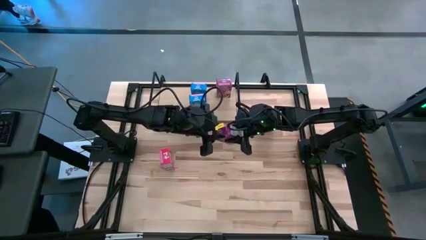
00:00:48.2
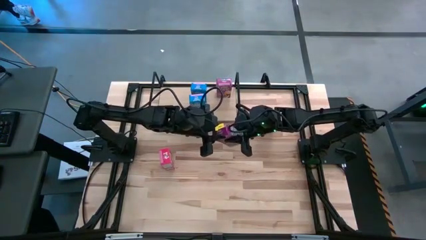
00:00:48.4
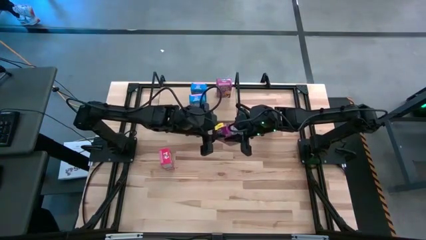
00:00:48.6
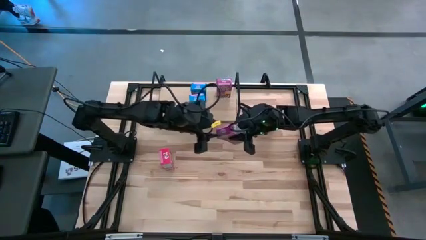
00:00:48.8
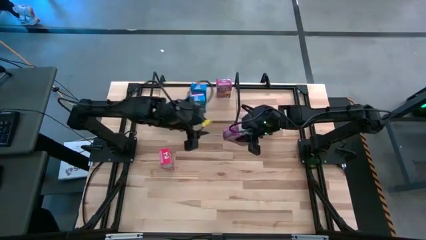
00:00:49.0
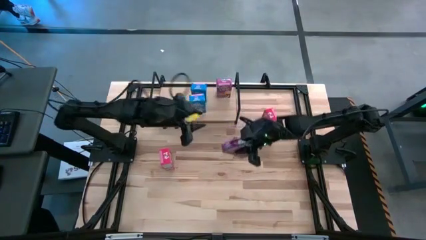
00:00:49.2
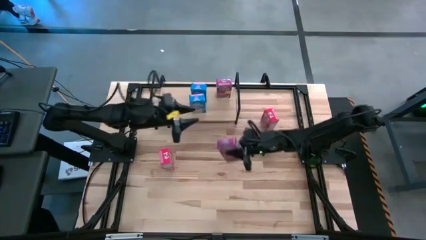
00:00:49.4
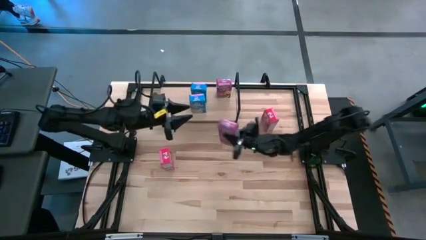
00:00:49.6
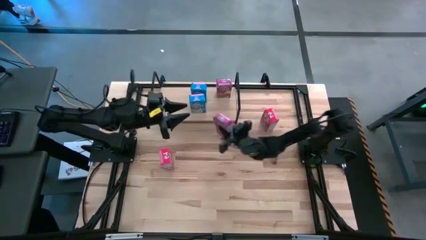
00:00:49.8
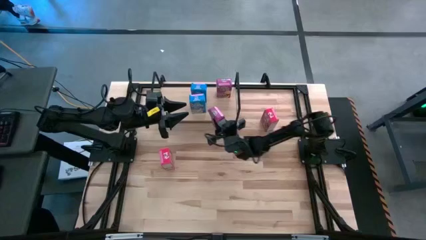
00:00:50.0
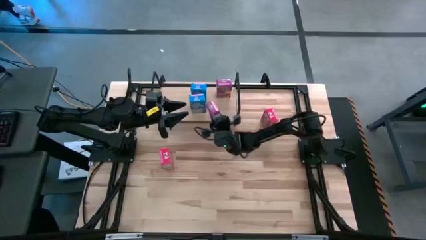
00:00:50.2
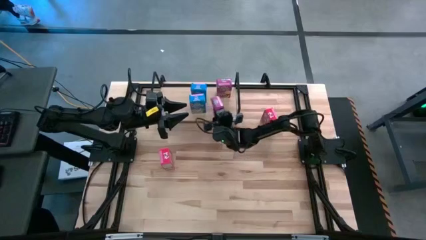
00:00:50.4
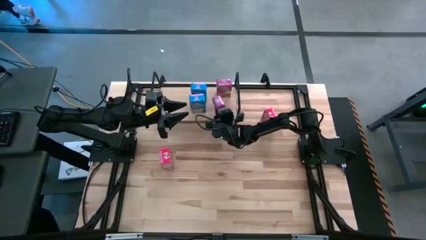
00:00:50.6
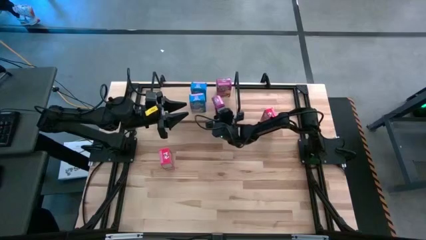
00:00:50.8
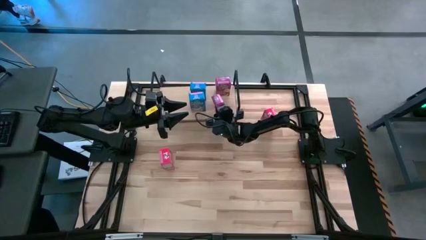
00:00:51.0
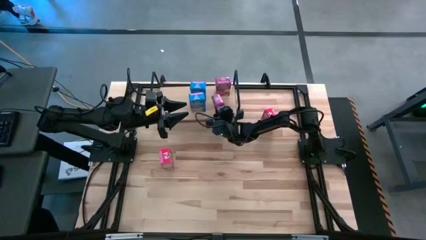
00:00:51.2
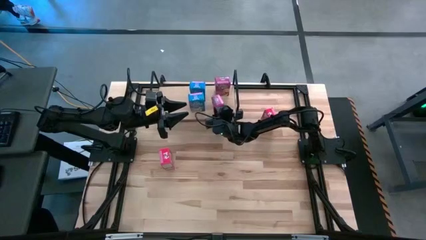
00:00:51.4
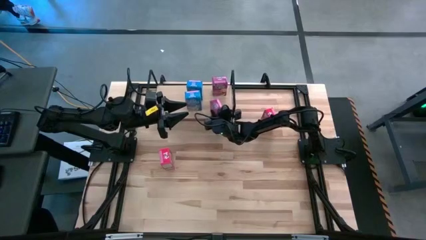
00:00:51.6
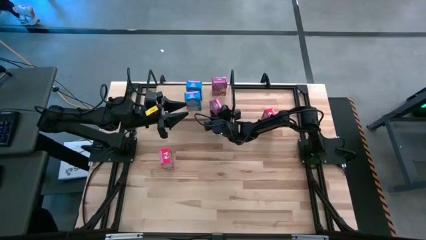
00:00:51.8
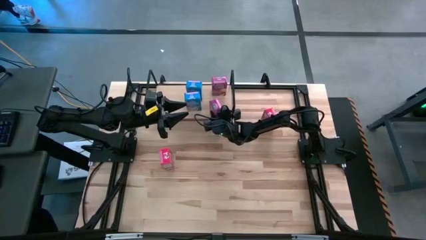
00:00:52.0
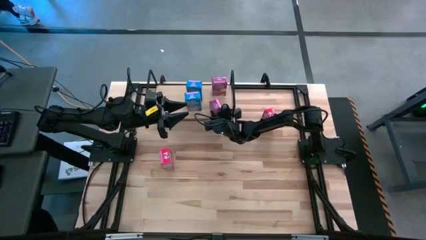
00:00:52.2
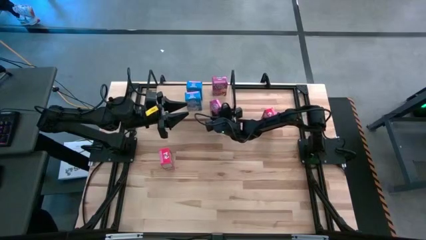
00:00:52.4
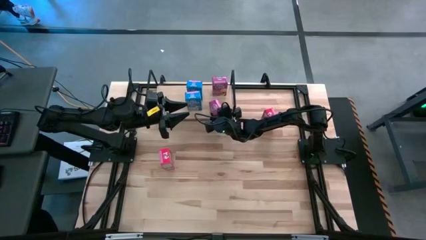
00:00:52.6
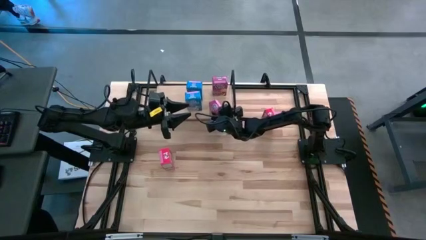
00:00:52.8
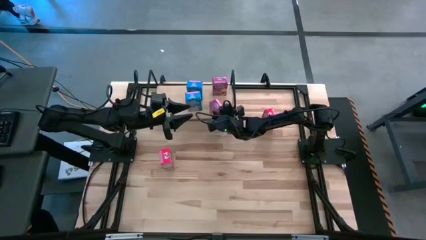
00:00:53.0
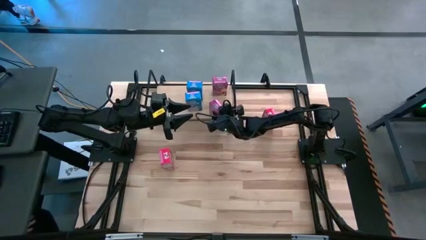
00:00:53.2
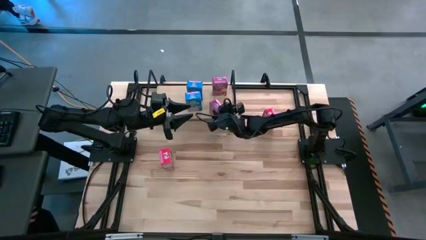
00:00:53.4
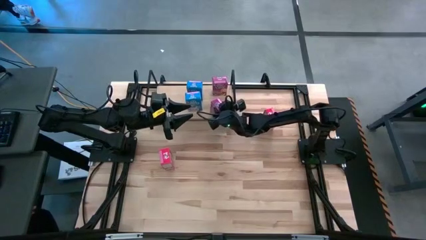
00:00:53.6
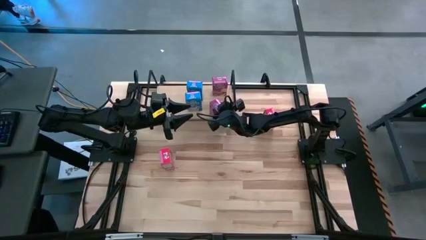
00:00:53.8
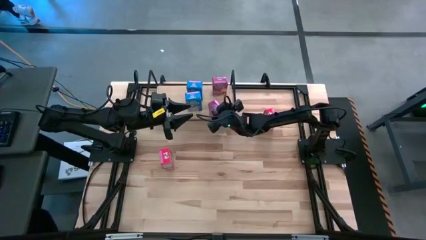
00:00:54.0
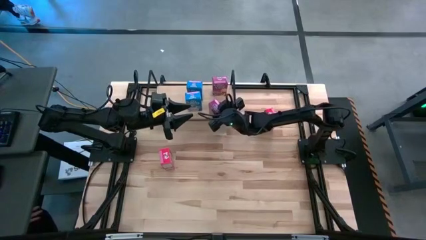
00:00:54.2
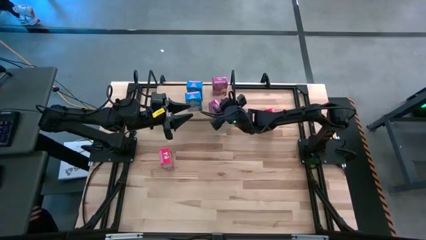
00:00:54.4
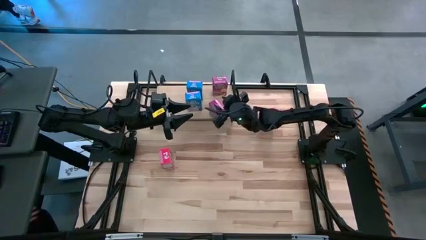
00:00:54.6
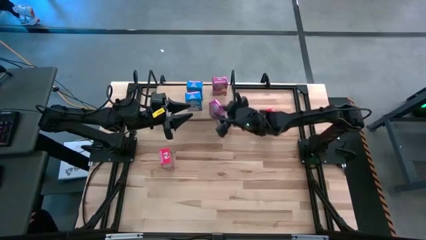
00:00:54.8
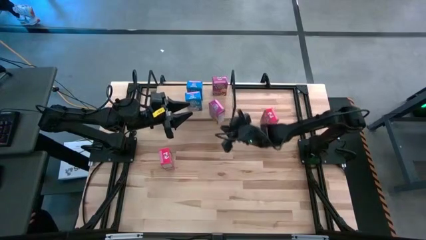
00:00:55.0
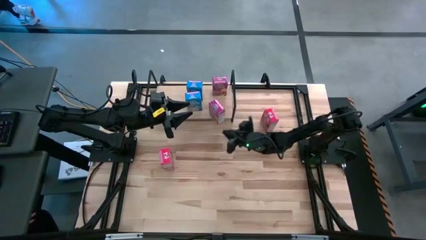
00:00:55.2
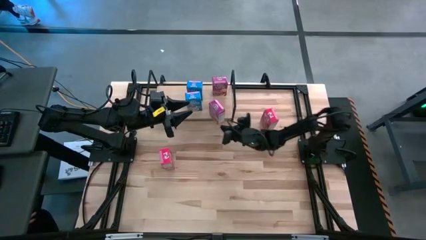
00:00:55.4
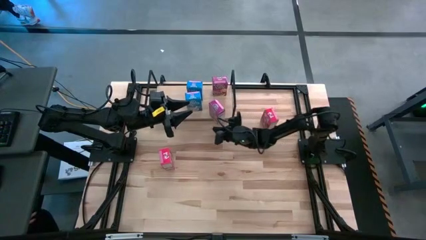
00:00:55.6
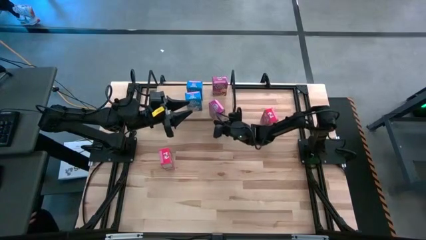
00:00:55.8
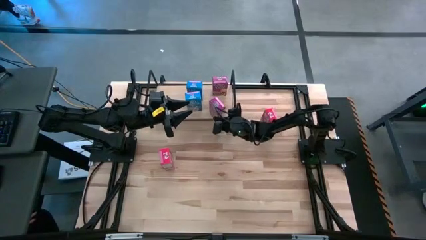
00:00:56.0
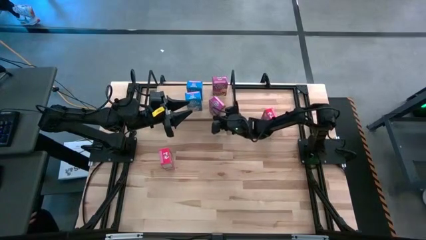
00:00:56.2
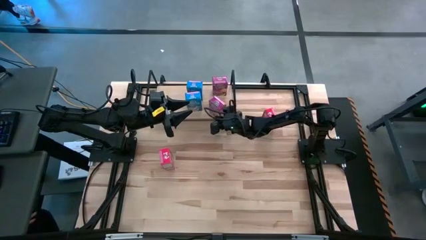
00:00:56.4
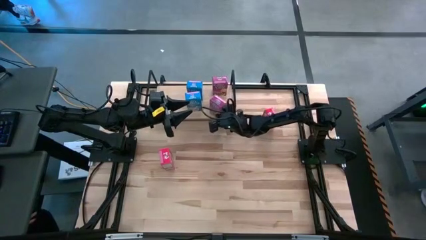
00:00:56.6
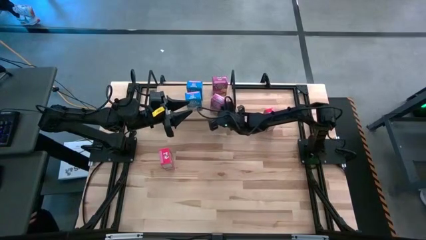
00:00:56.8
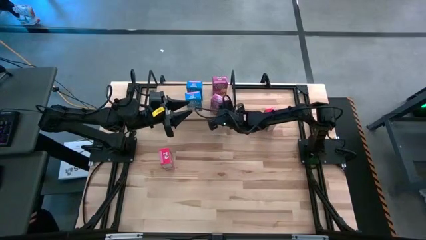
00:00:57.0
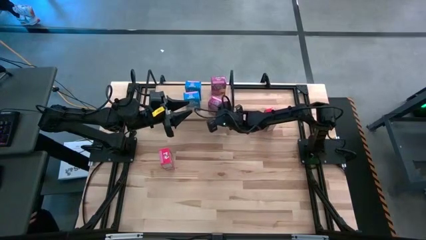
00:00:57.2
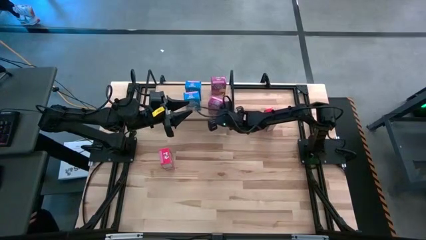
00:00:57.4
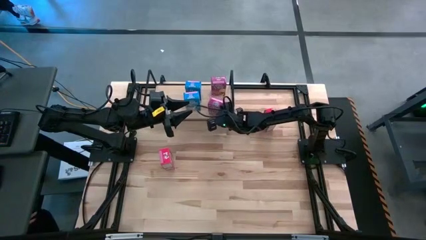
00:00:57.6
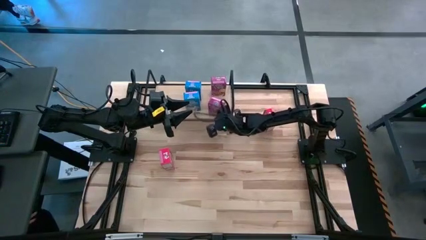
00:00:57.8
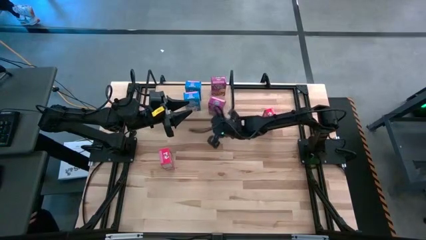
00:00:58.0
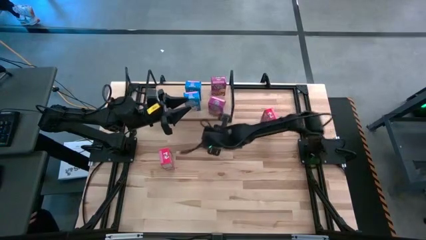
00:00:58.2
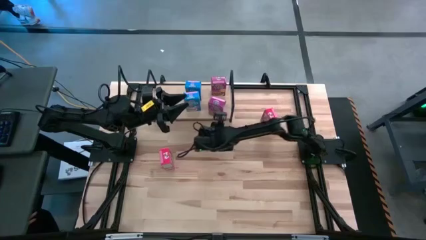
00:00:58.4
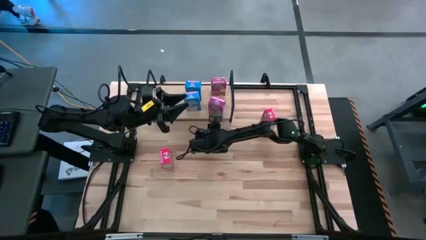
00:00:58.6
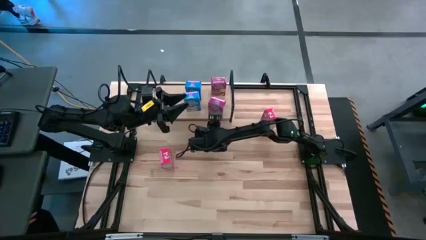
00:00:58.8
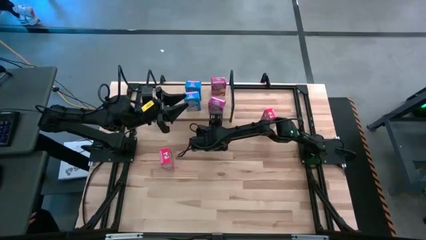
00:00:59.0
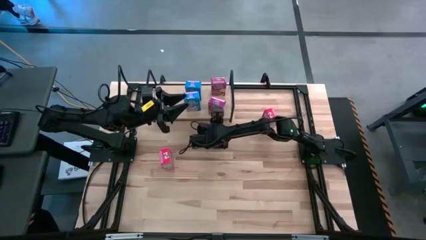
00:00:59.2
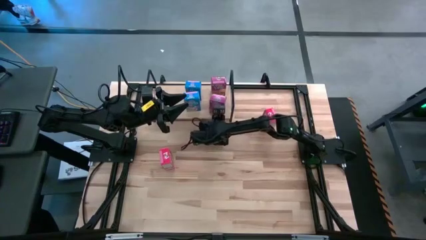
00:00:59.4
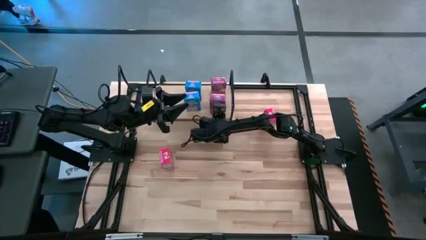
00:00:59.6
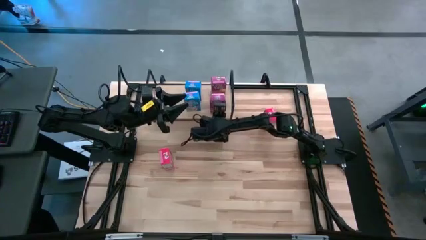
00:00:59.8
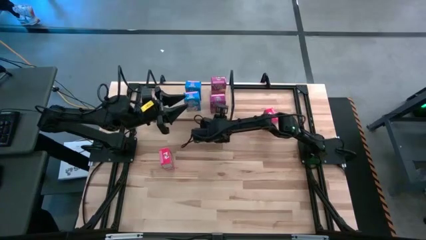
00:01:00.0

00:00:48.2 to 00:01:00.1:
Task: Stack cereal on shelf
Put the purple cereal box on the shelf aligned with the other purple cereal box
